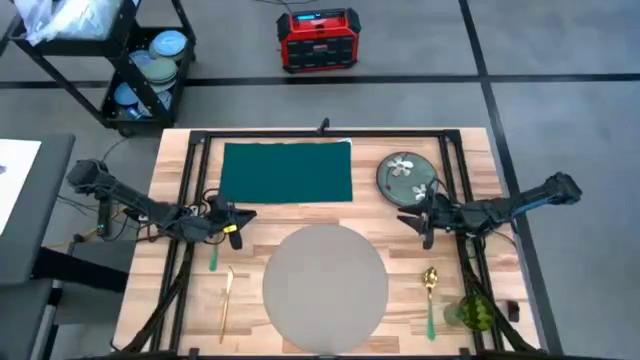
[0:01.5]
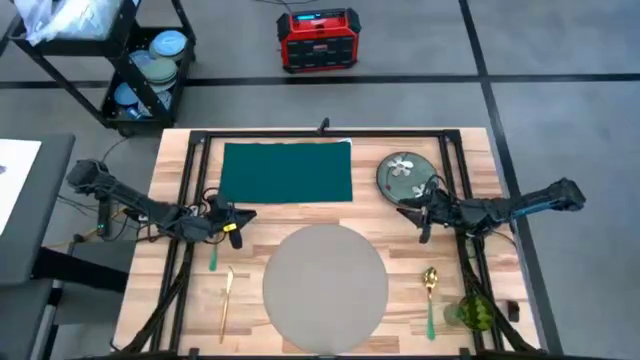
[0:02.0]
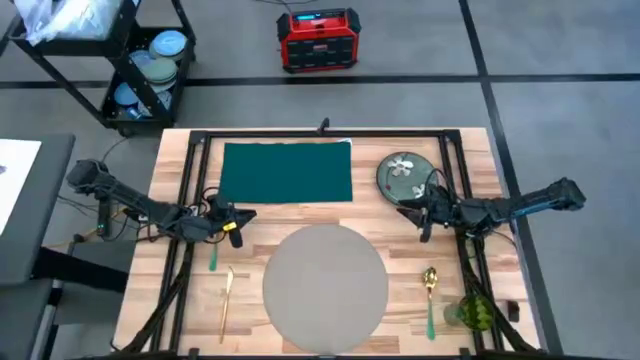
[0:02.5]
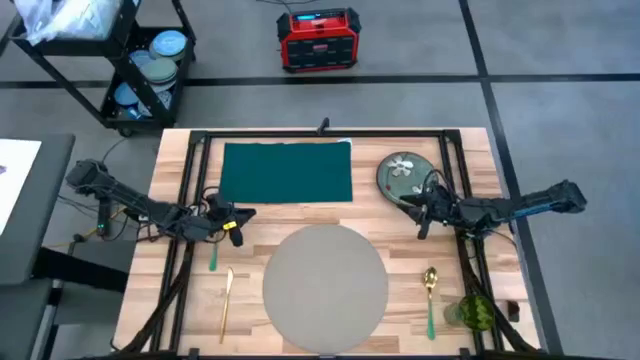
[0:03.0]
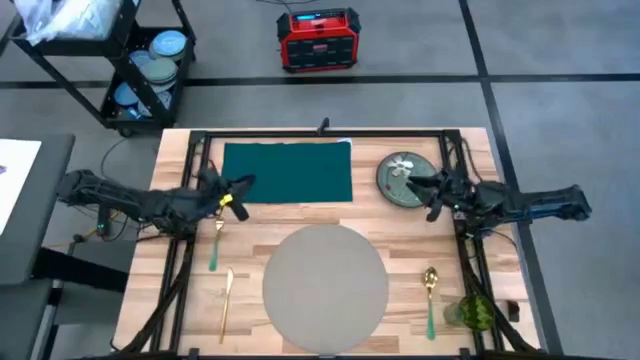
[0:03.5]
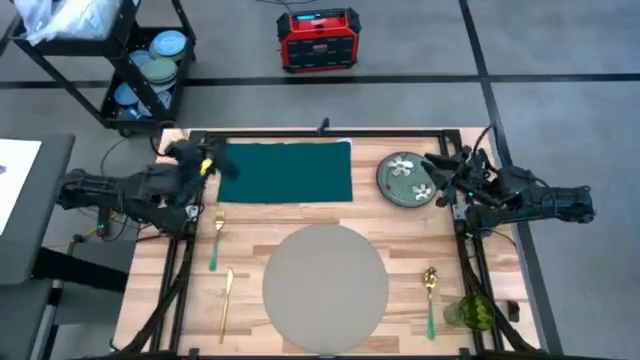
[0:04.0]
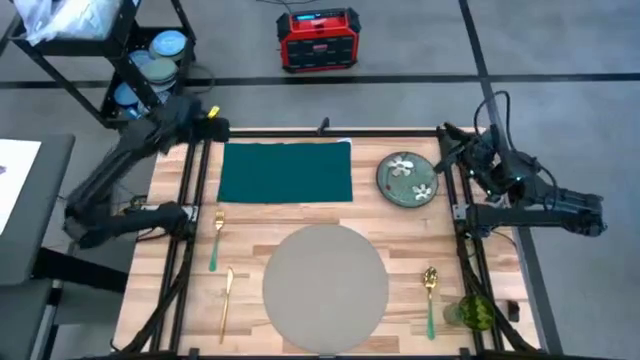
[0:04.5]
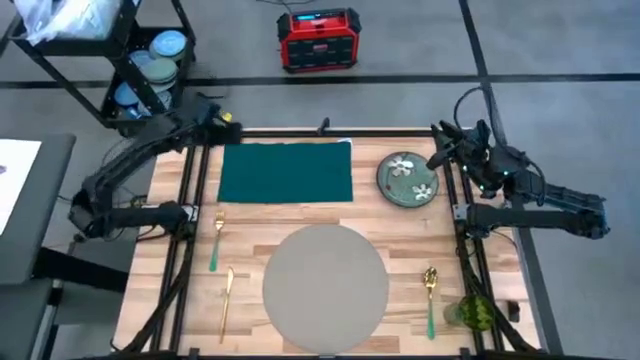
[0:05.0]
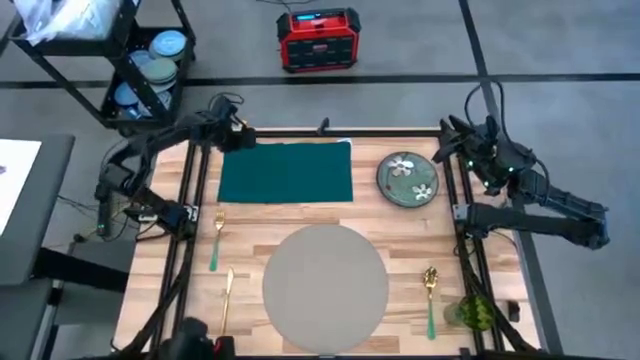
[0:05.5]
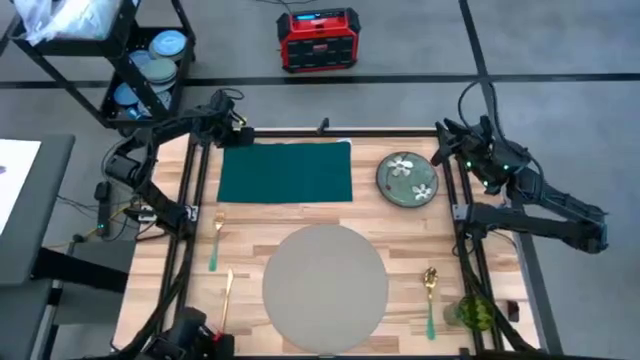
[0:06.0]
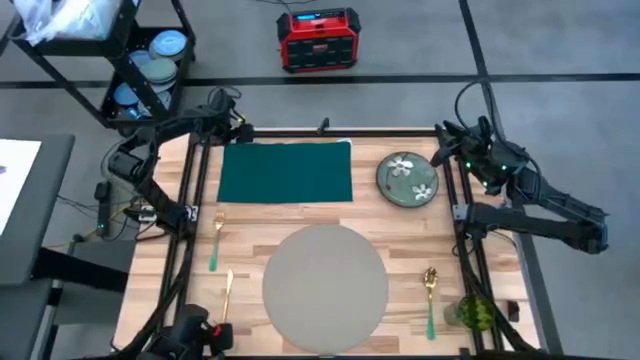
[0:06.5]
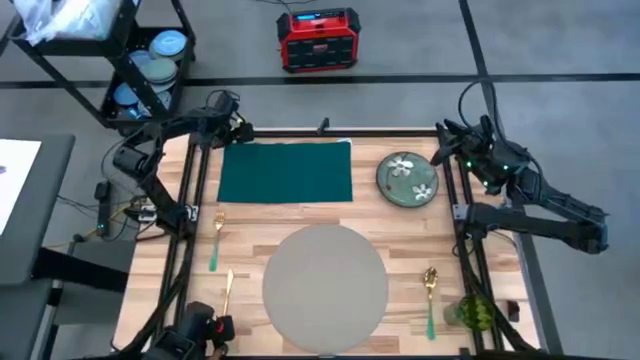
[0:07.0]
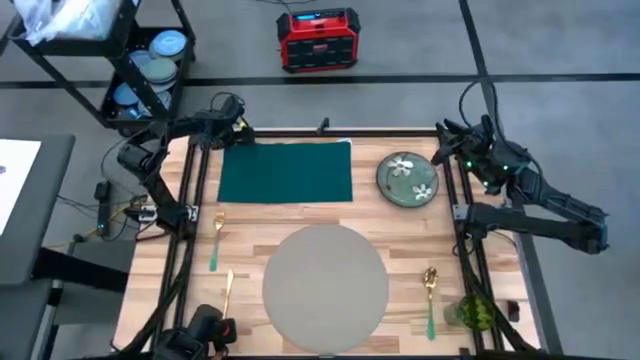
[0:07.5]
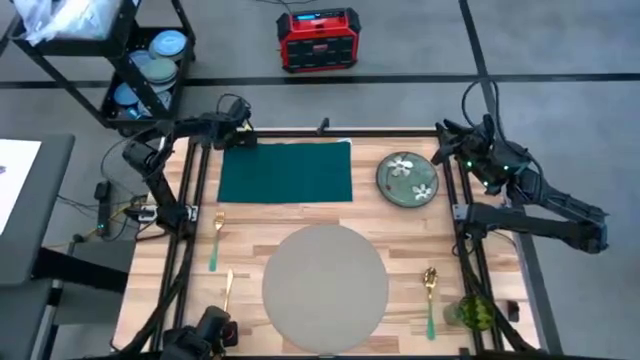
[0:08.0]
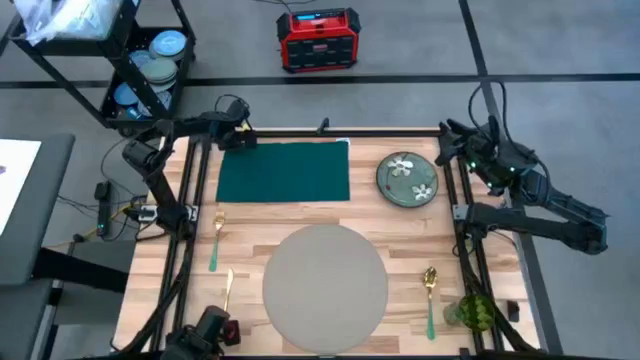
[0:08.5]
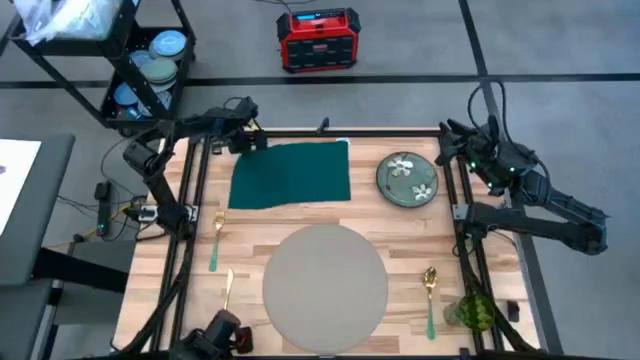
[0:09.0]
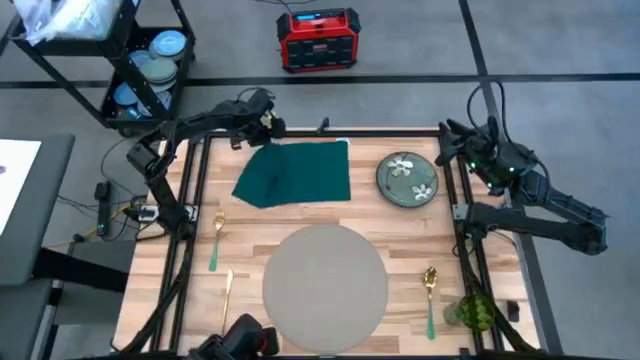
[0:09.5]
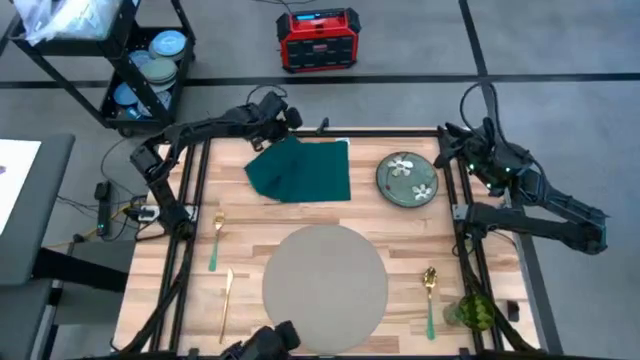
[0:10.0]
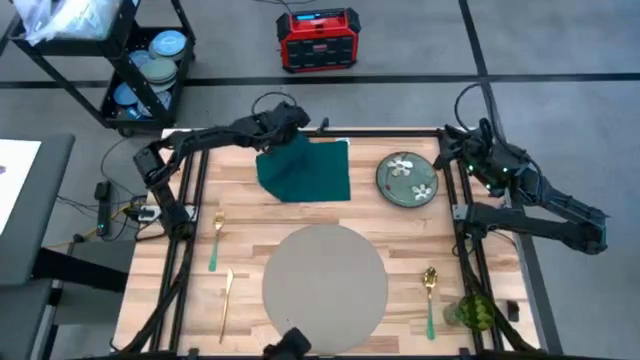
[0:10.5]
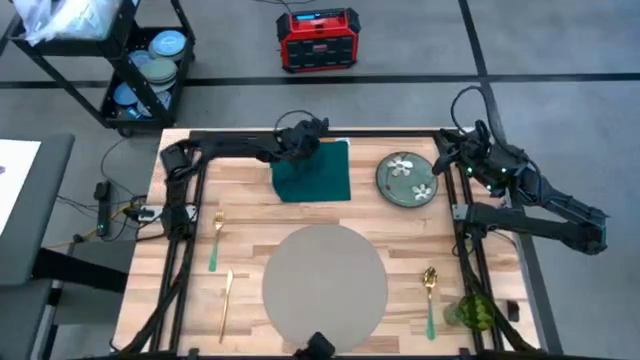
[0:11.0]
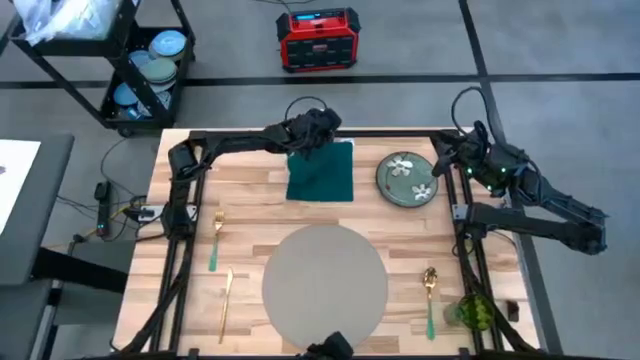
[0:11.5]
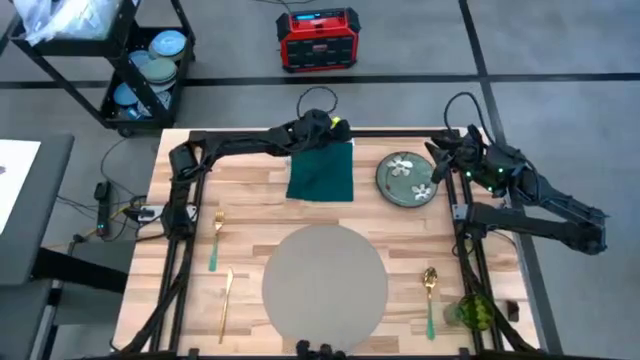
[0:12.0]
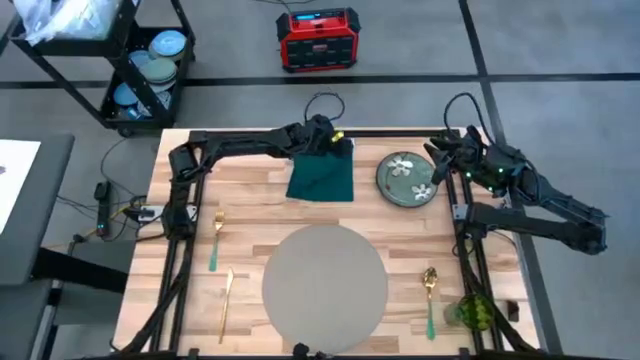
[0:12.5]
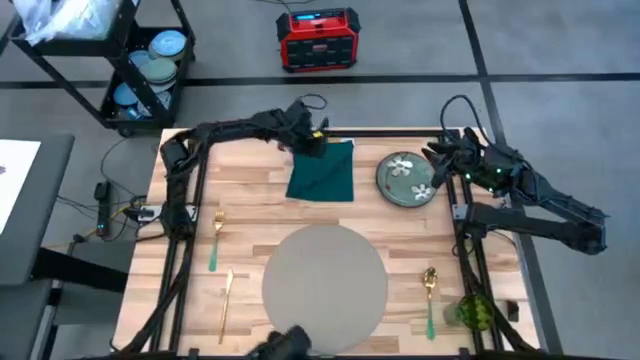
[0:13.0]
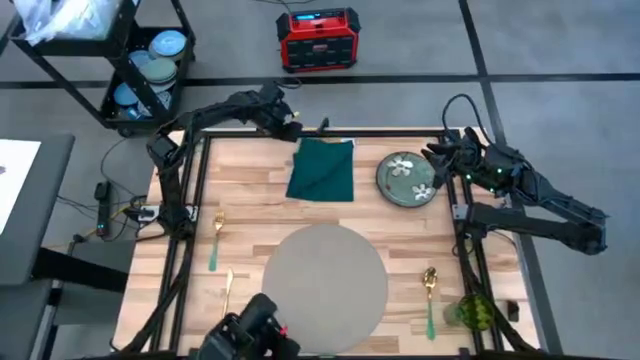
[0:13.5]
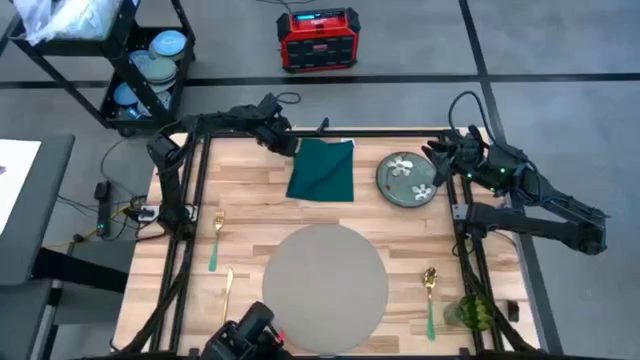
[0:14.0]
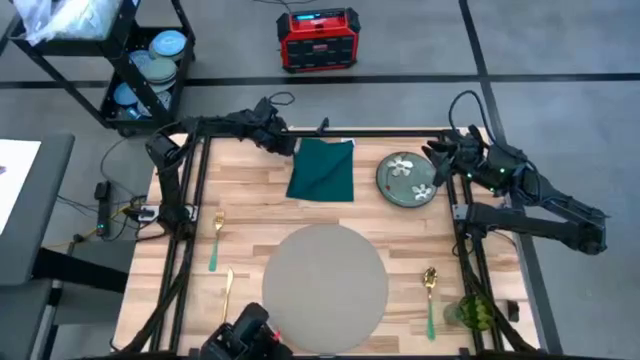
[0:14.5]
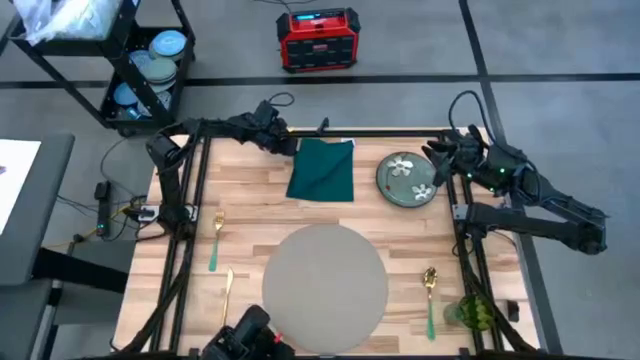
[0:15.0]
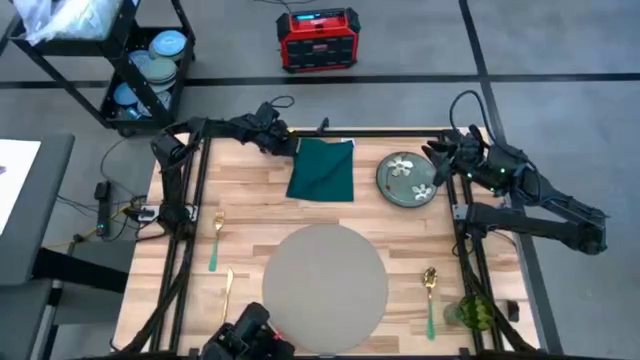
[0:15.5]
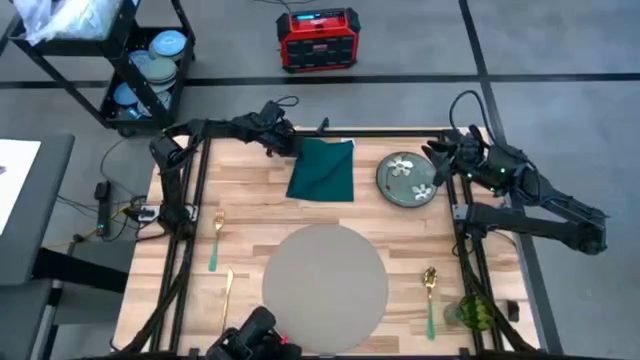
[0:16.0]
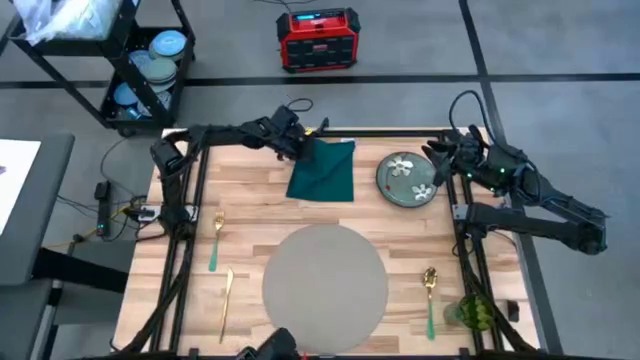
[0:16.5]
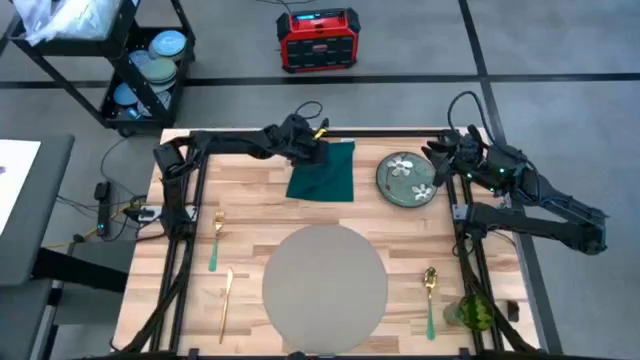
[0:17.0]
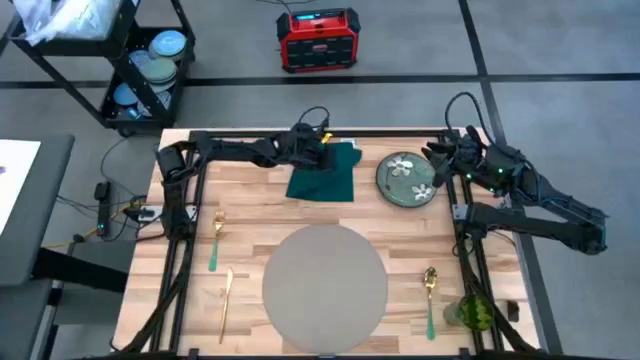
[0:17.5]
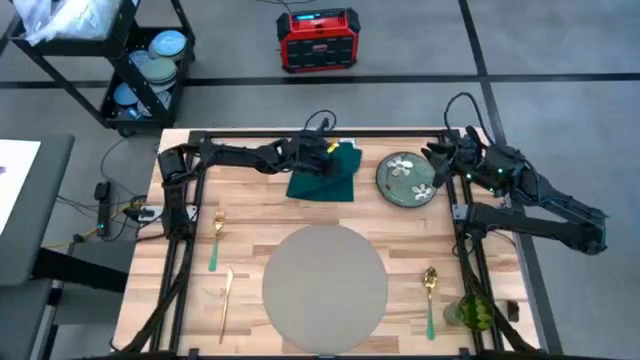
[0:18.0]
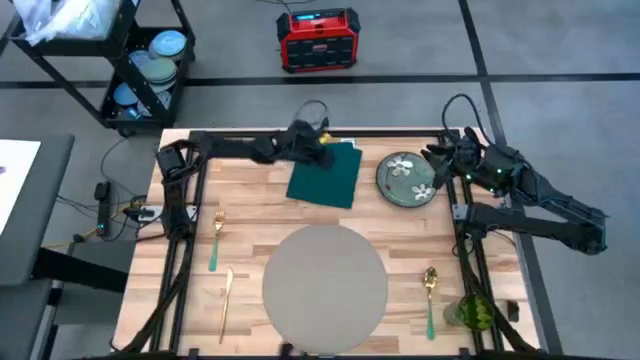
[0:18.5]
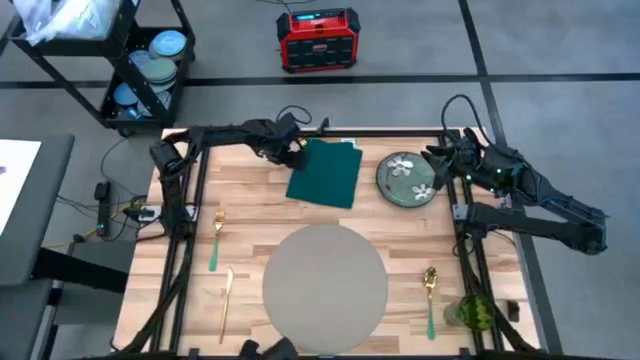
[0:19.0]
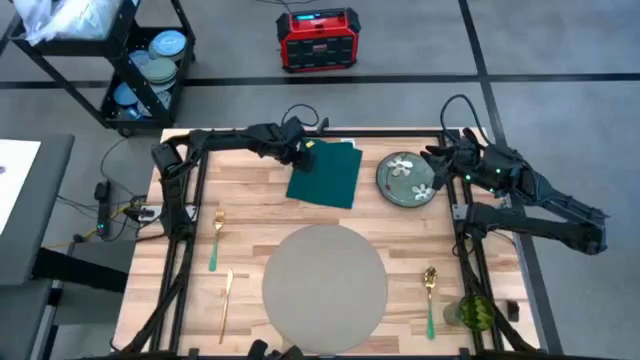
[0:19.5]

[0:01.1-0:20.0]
Task: Set table place
Fold the green napkin
